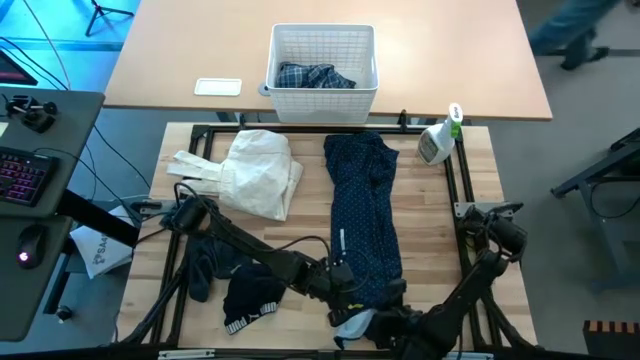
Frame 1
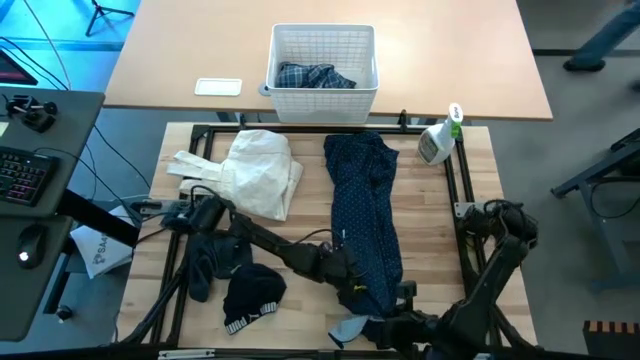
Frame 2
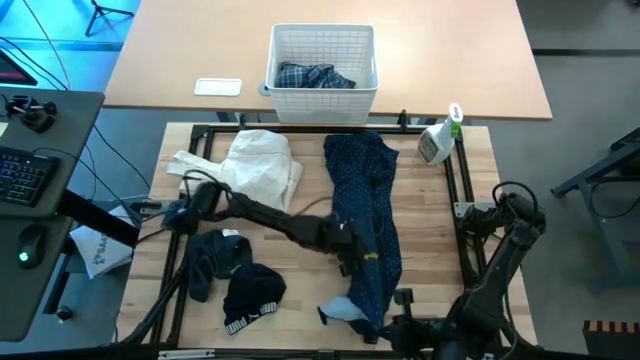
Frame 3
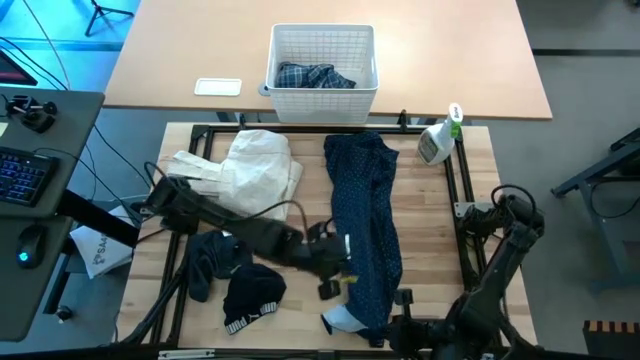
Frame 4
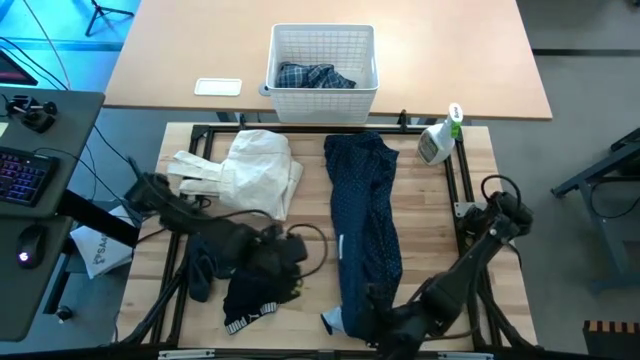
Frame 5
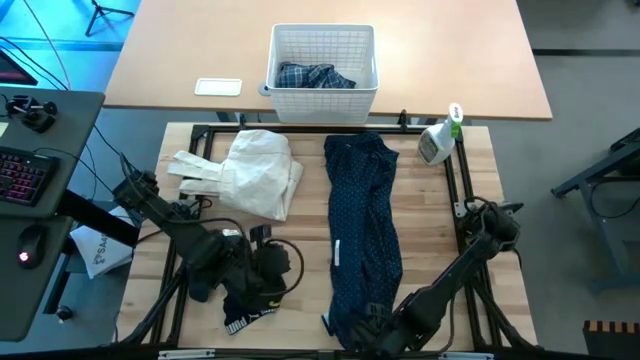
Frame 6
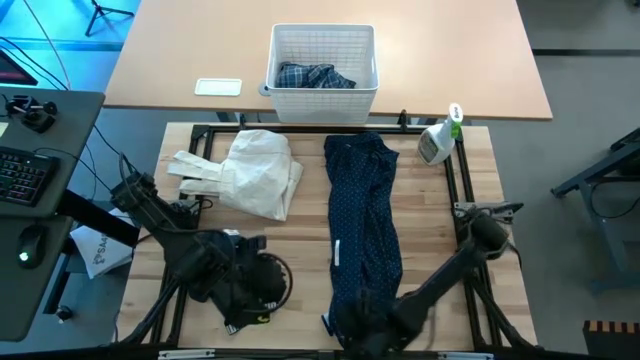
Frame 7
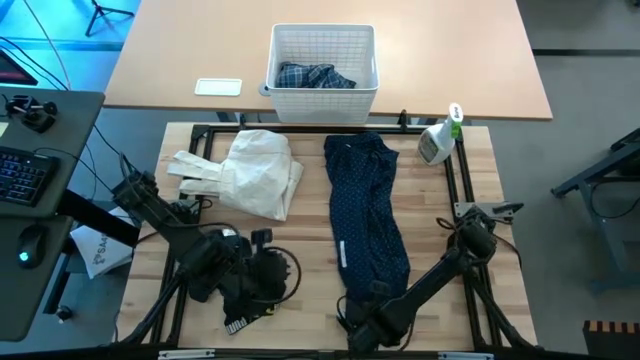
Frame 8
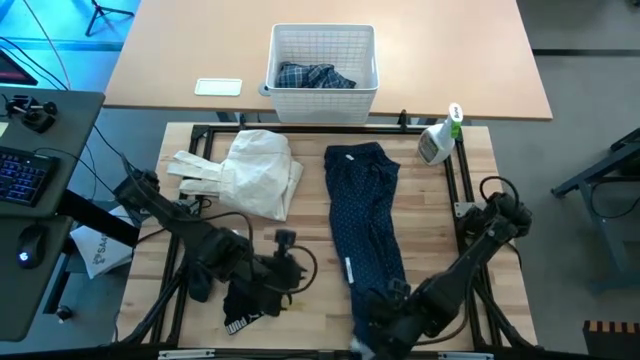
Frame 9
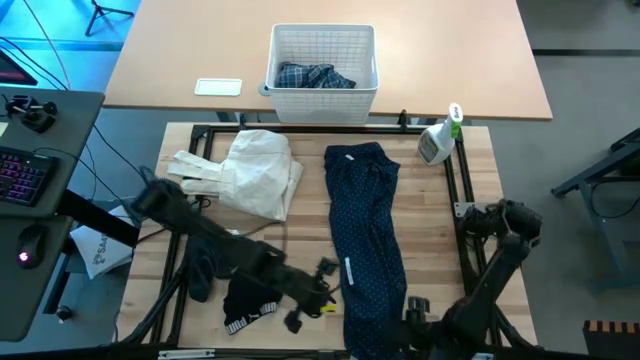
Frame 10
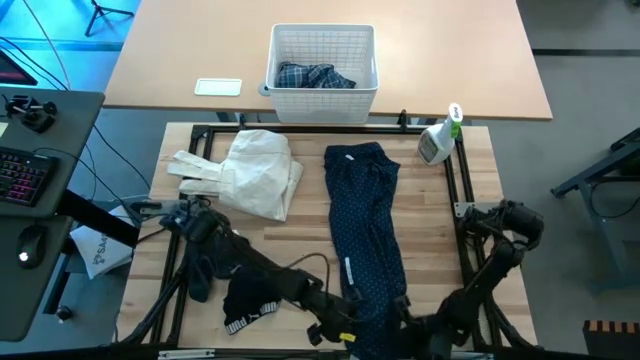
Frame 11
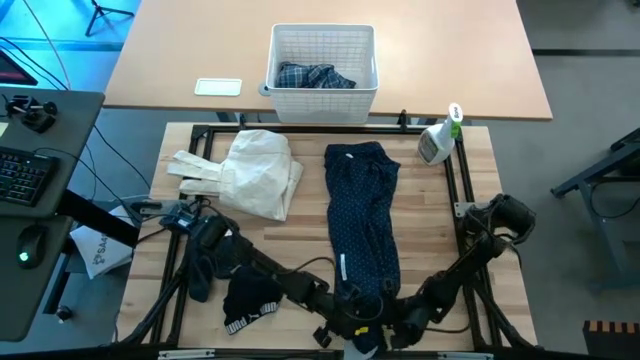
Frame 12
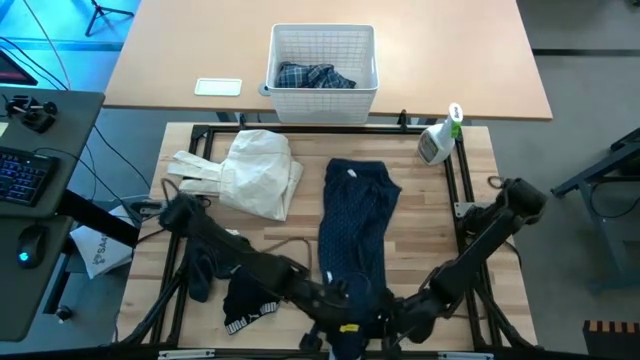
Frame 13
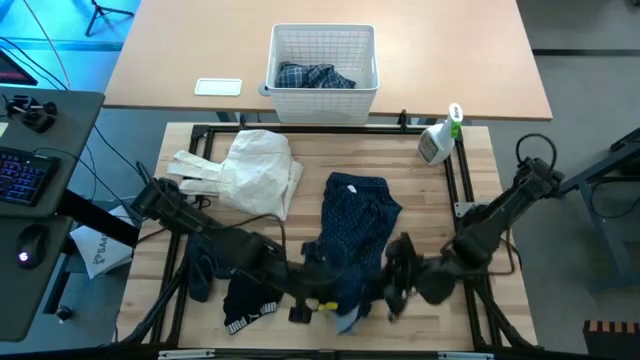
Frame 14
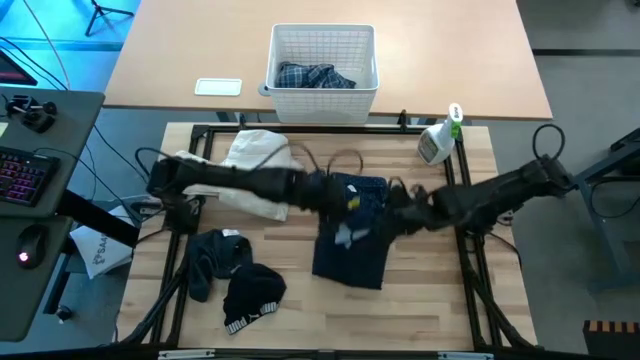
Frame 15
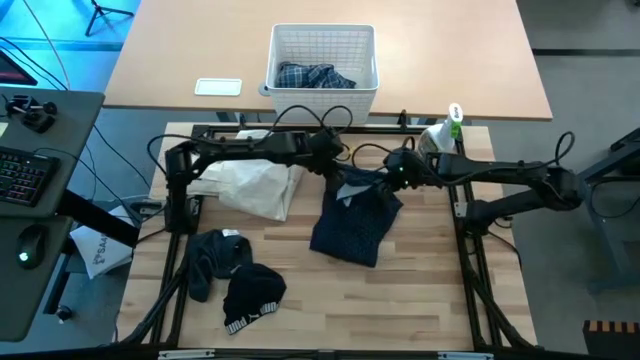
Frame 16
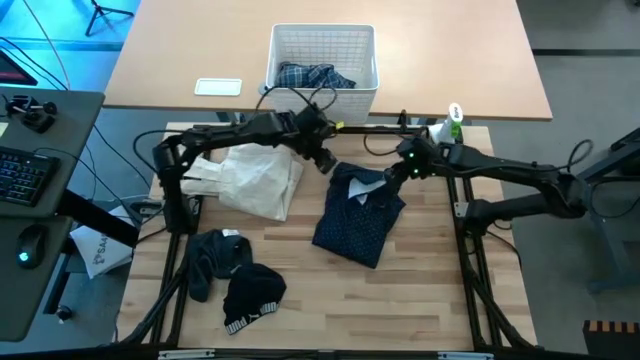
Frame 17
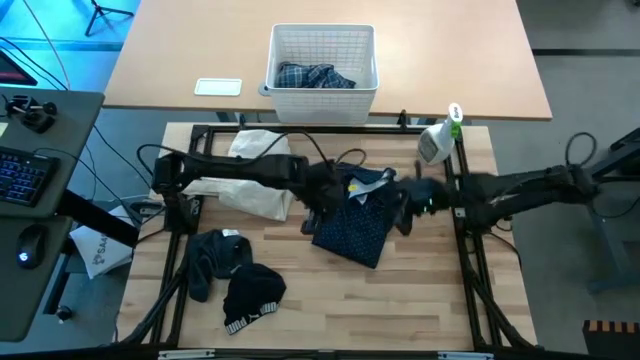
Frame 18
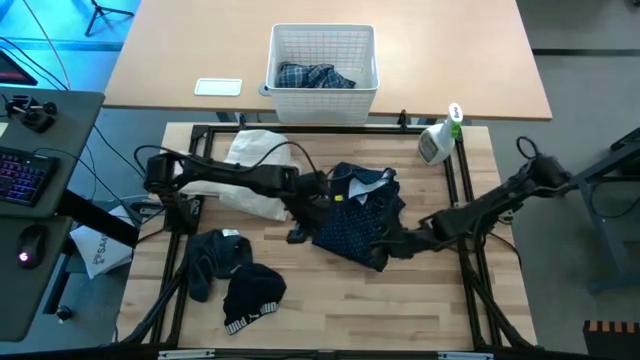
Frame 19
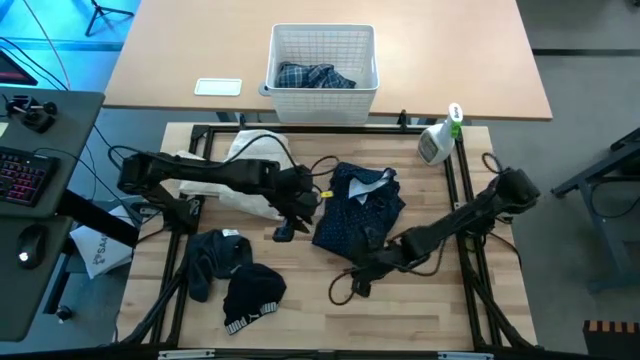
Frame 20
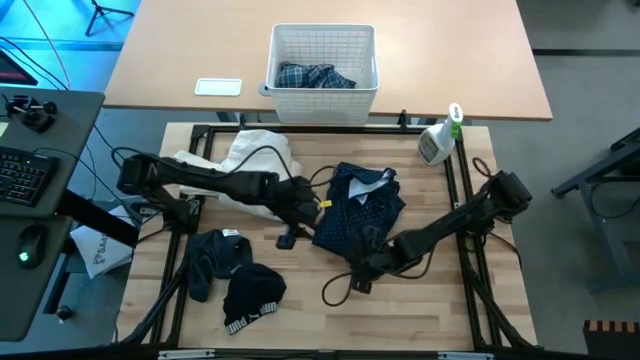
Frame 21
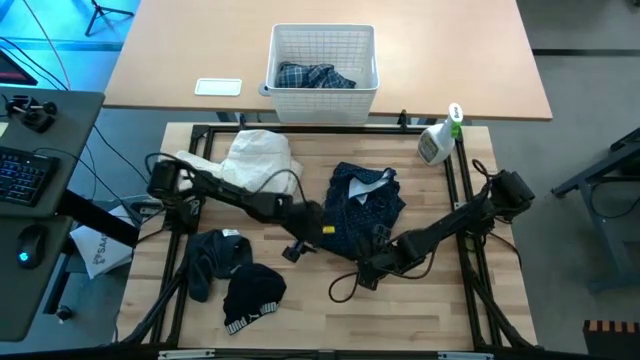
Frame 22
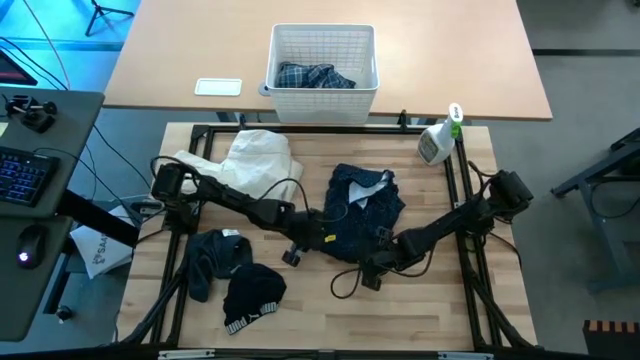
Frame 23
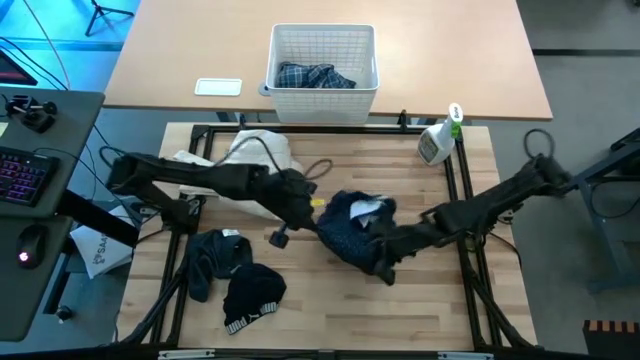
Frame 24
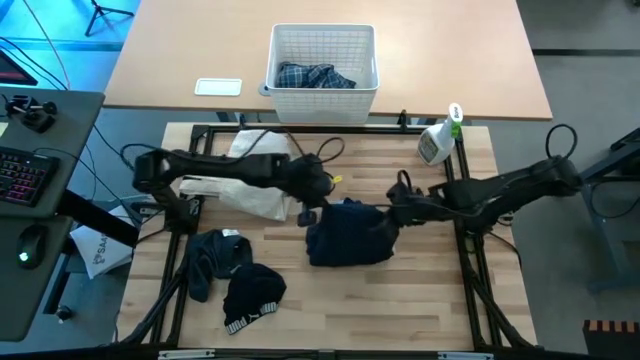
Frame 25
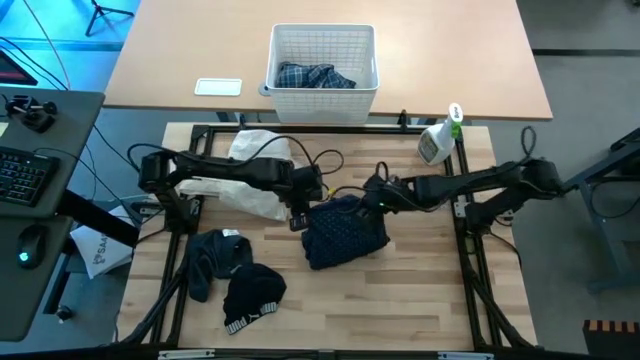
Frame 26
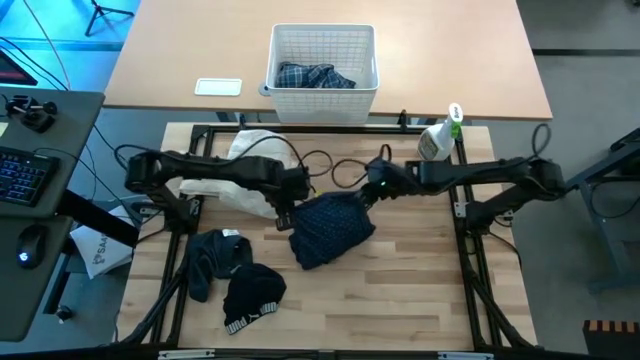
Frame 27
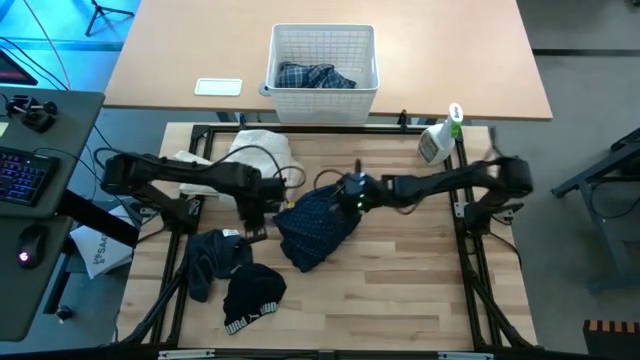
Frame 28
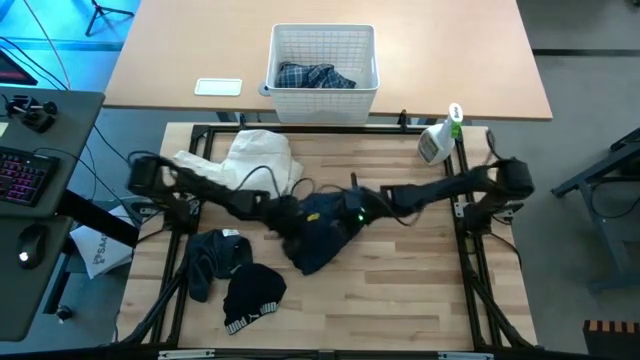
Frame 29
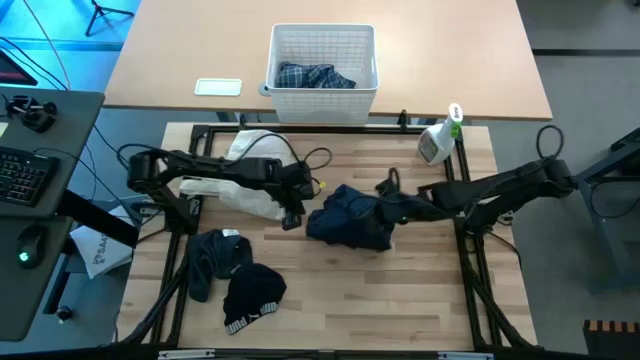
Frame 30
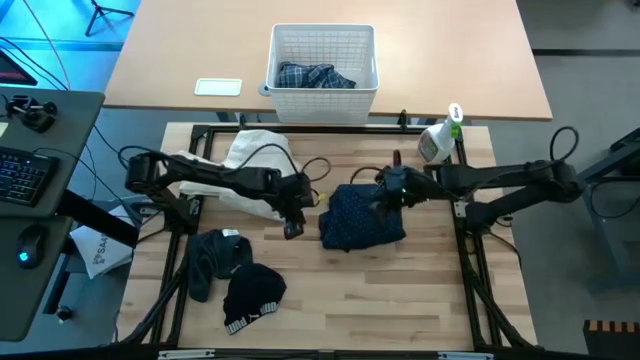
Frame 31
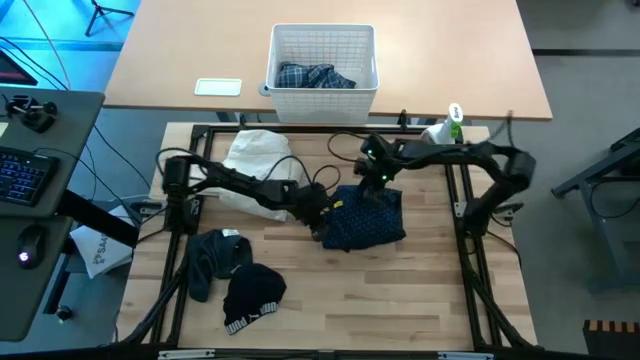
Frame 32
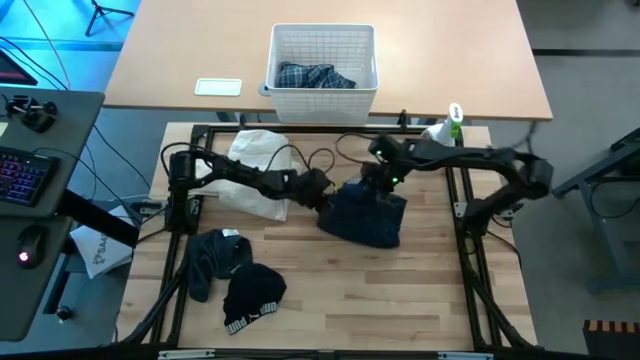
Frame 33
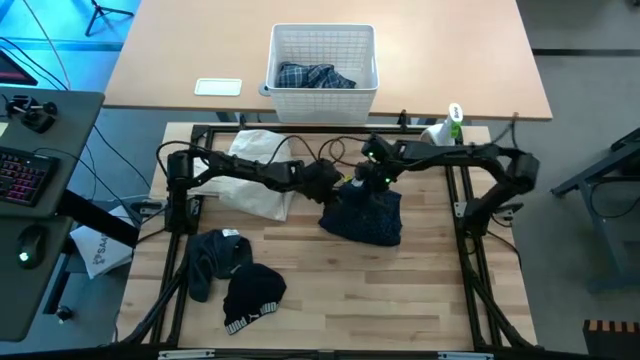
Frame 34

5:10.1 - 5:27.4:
Task: Fold laundry
Fold the navy blue polo shirt

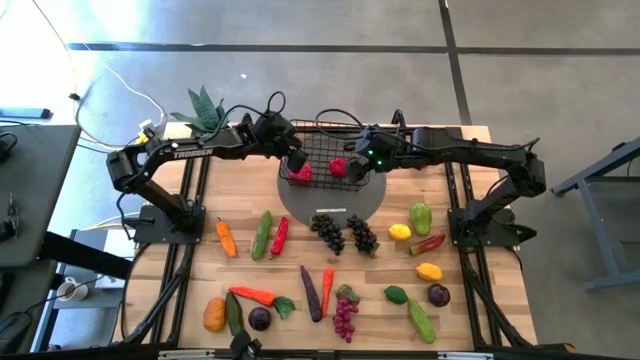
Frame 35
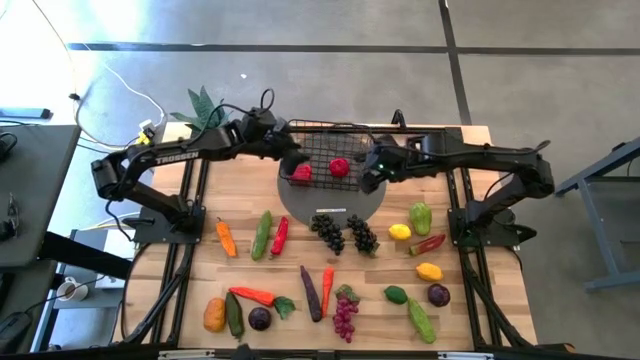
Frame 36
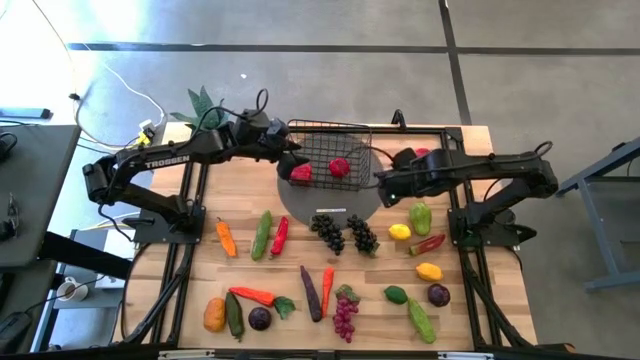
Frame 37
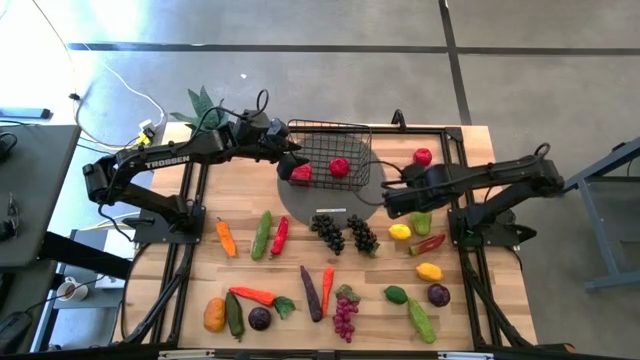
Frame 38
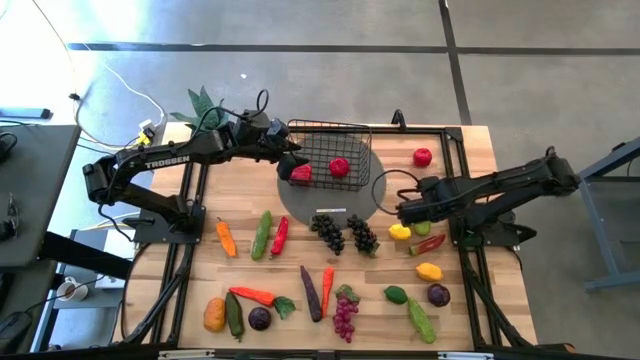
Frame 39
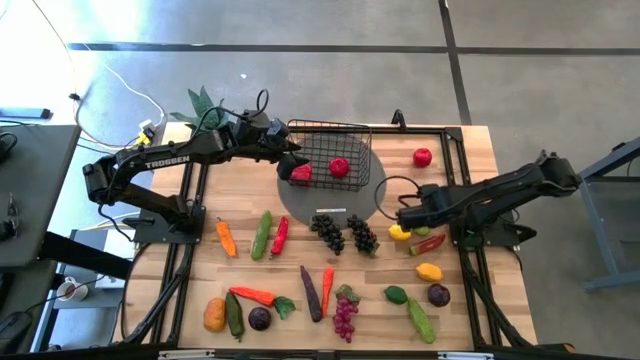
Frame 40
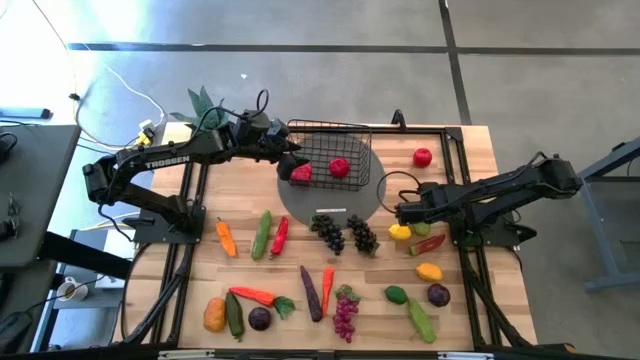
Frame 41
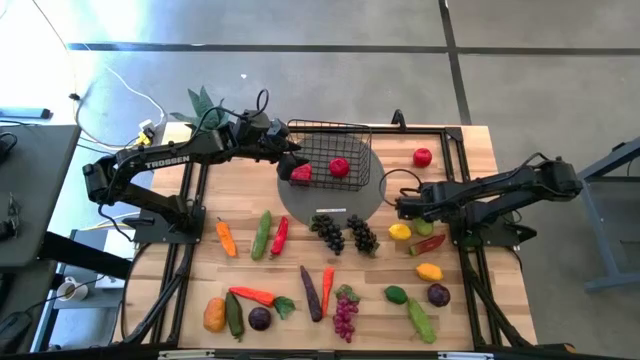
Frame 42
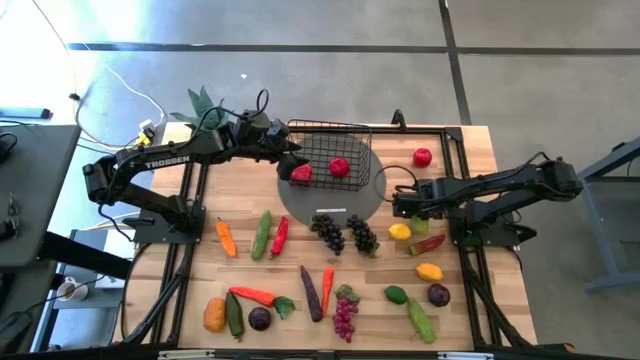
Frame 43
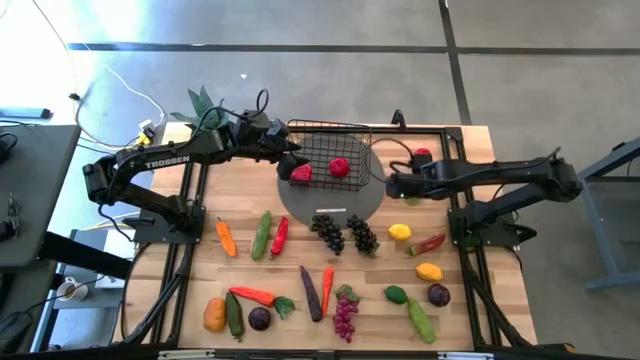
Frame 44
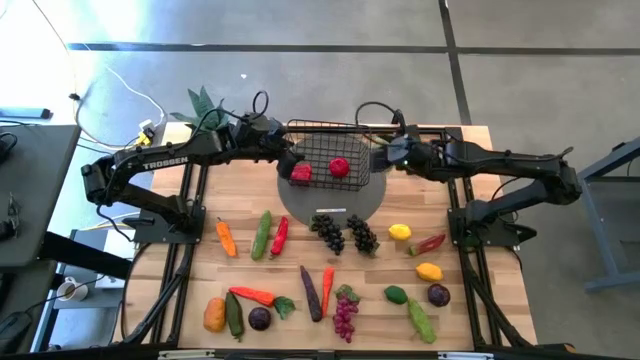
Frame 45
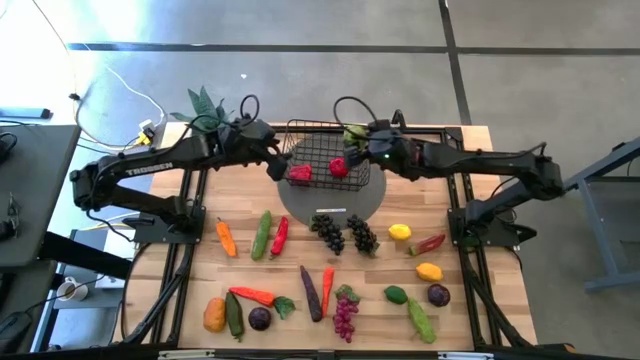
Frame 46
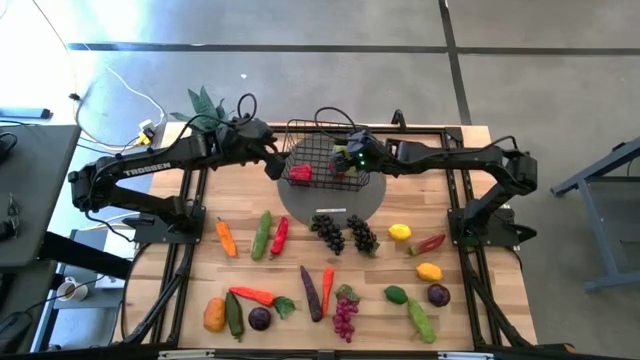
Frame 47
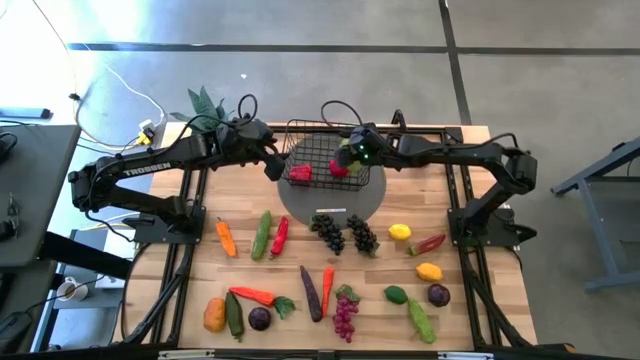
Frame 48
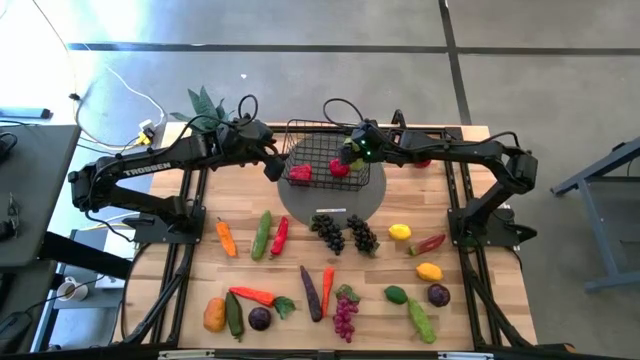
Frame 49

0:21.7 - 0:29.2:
Task: Build produce basket
Put the green chayote into the wire basket
